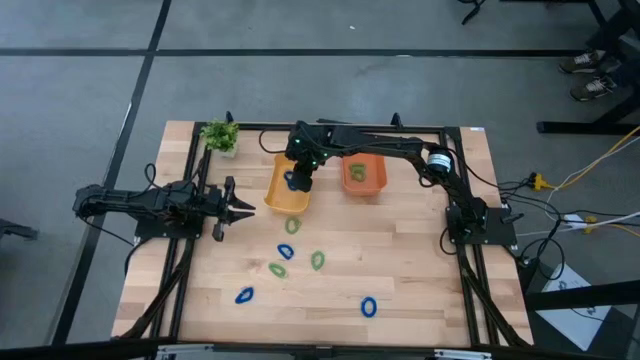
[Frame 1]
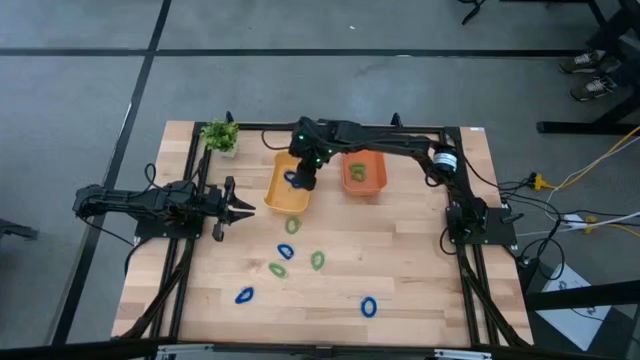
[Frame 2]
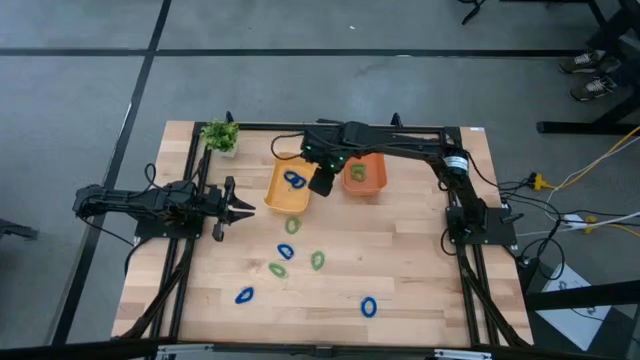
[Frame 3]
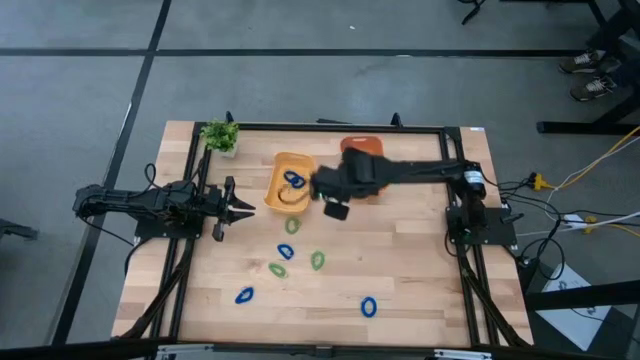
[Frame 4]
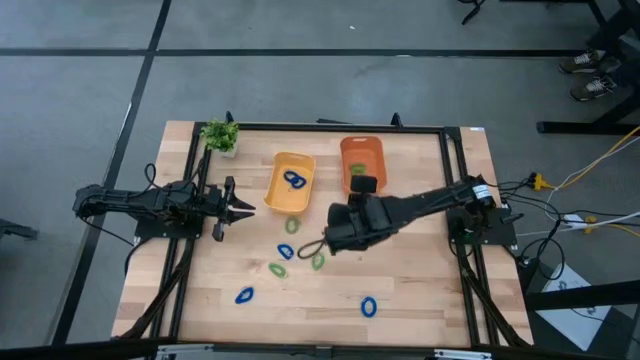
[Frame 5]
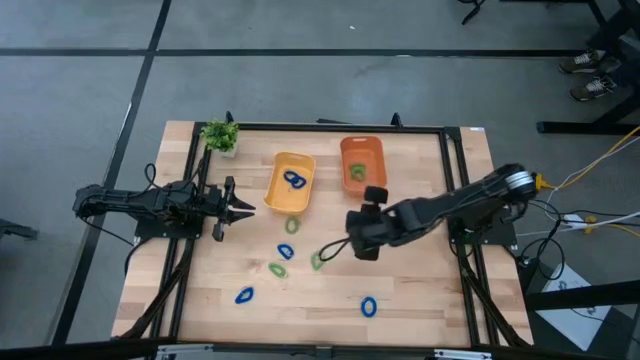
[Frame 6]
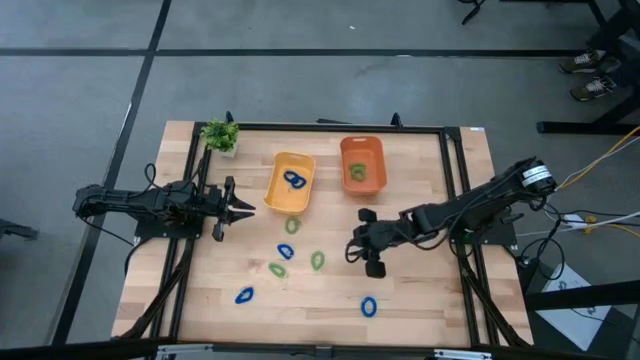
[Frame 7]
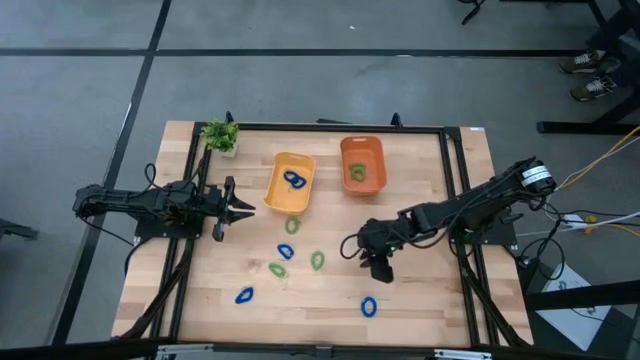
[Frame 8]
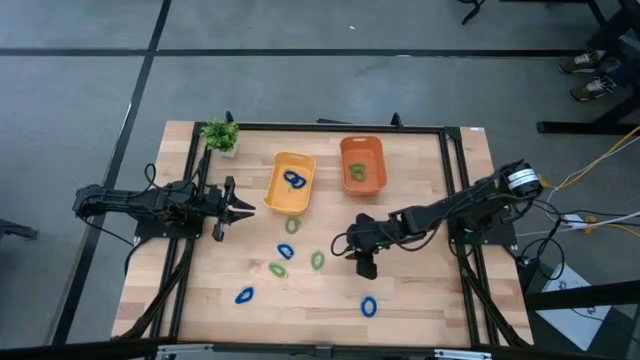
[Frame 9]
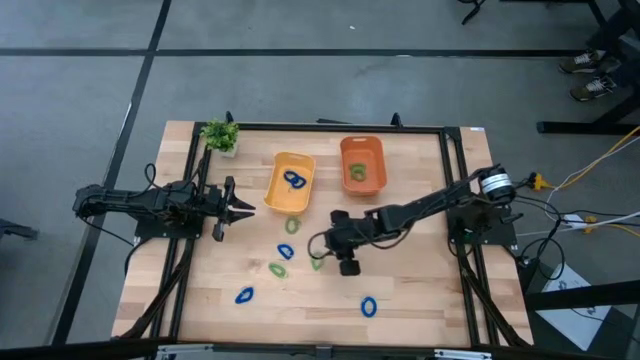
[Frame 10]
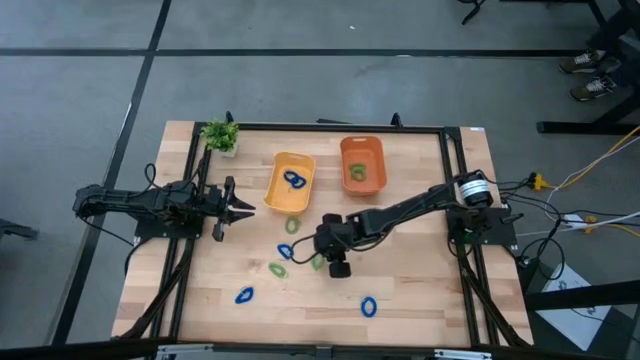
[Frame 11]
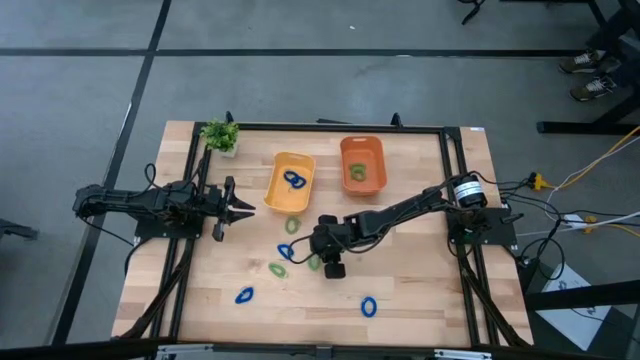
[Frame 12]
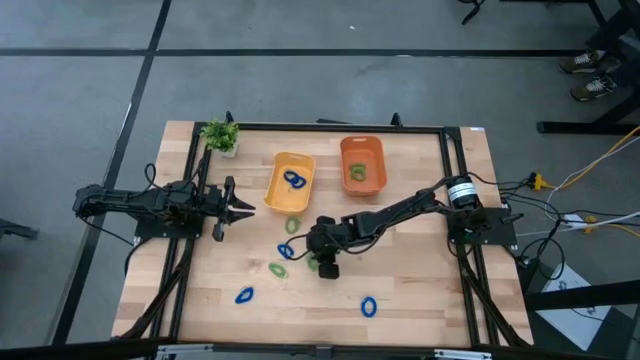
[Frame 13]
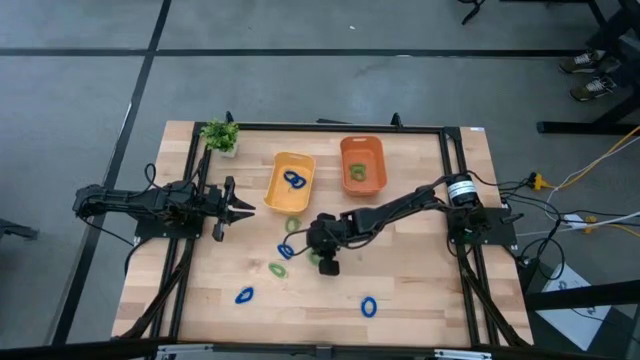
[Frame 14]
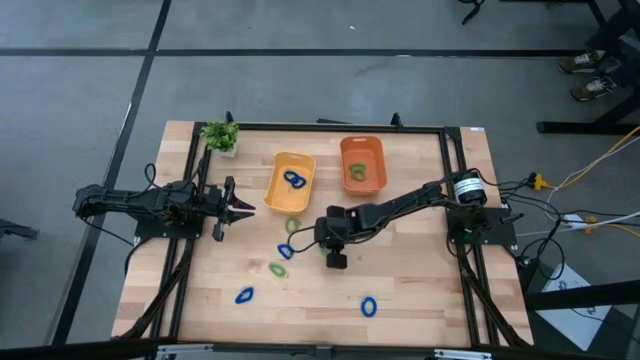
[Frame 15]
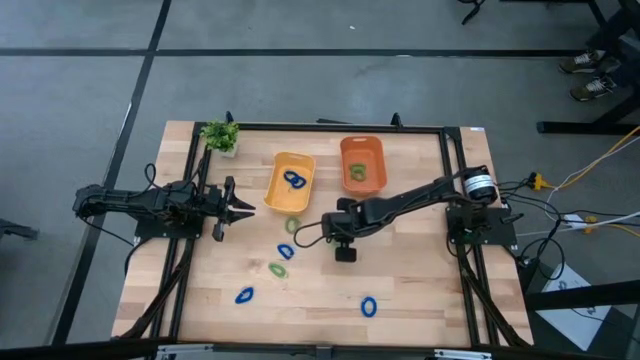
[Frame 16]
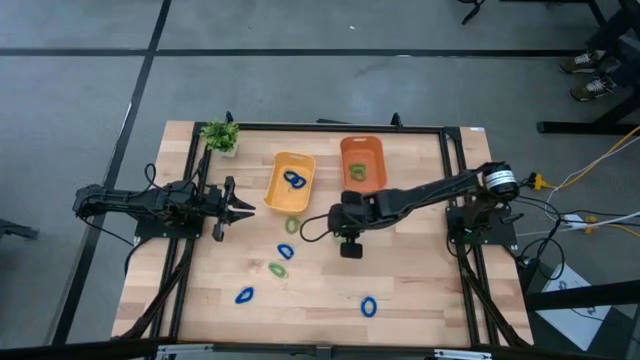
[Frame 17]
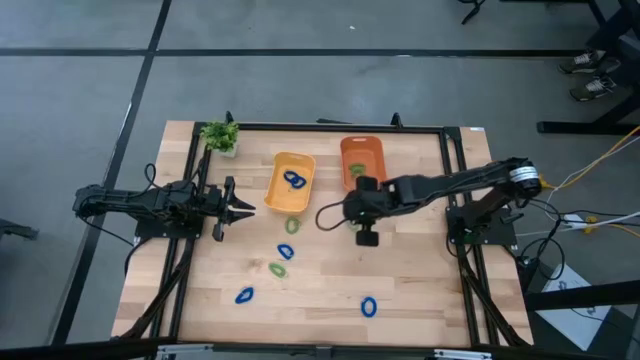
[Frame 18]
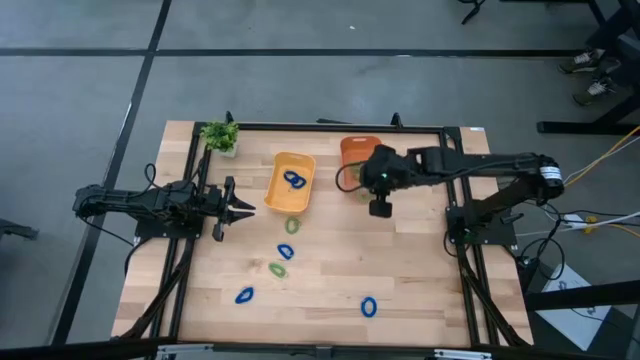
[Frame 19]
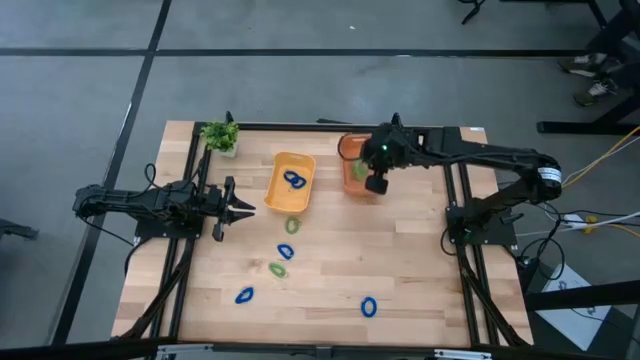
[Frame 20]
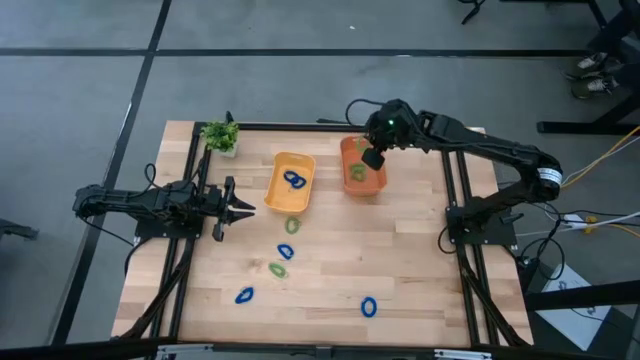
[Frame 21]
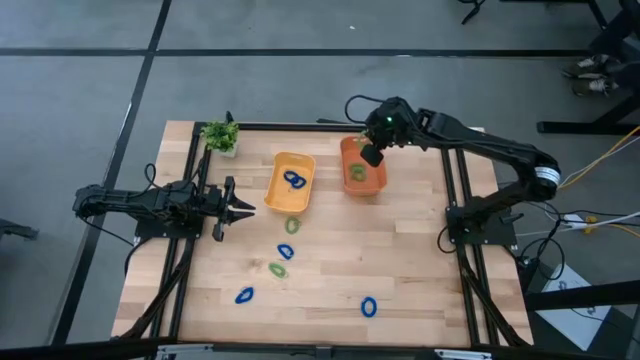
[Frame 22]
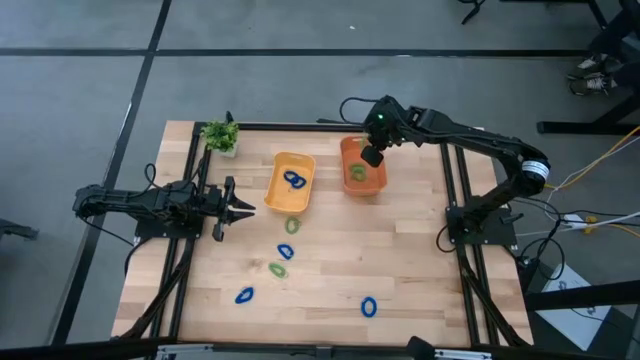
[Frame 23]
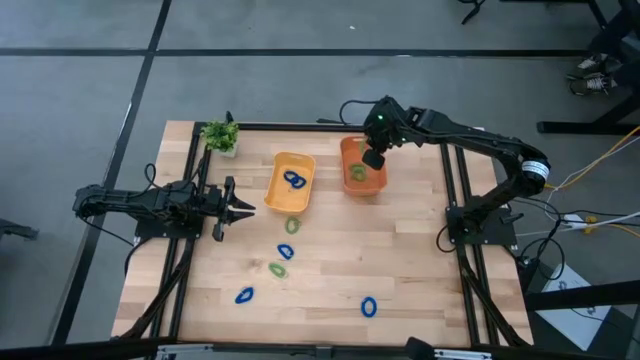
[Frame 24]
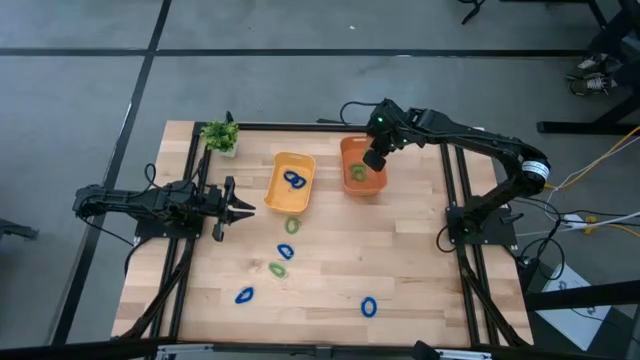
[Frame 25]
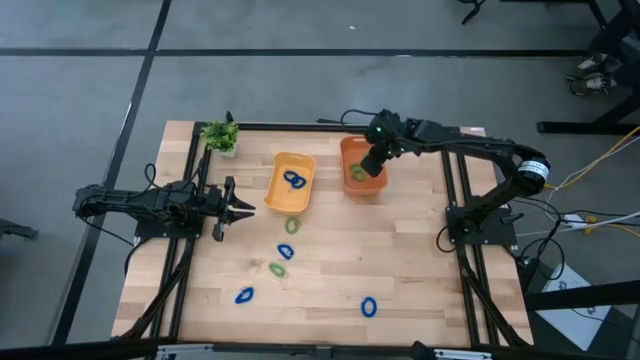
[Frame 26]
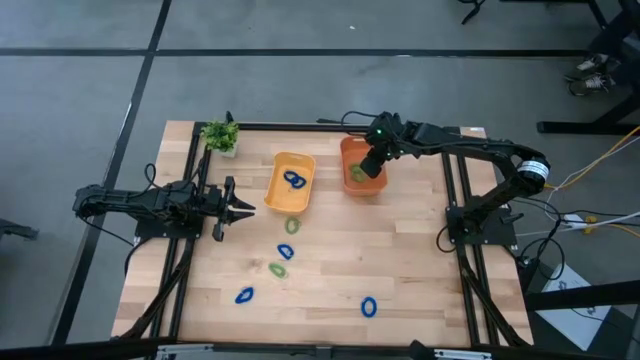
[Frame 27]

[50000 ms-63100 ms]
Task: Sort items
Put the green keychain into the orange bin

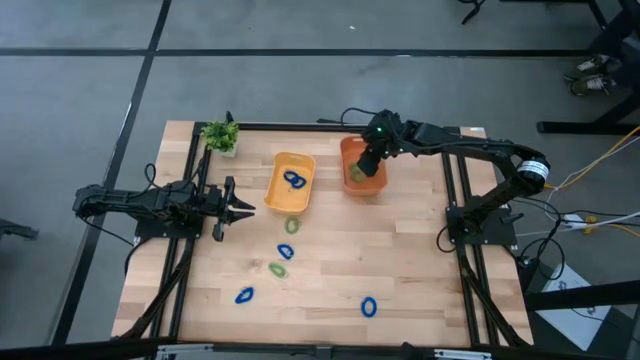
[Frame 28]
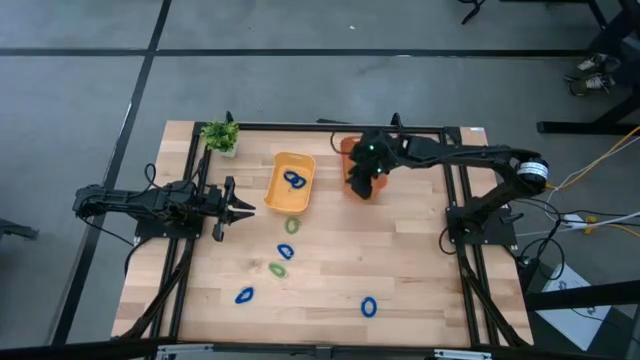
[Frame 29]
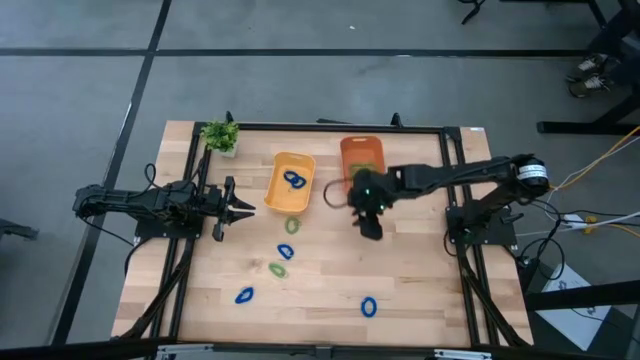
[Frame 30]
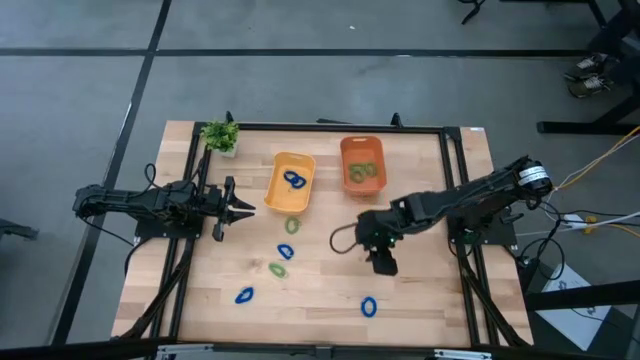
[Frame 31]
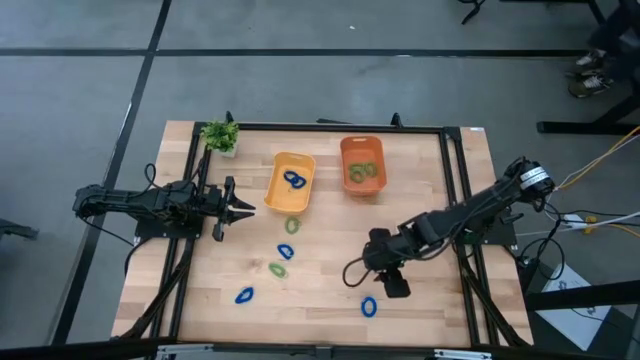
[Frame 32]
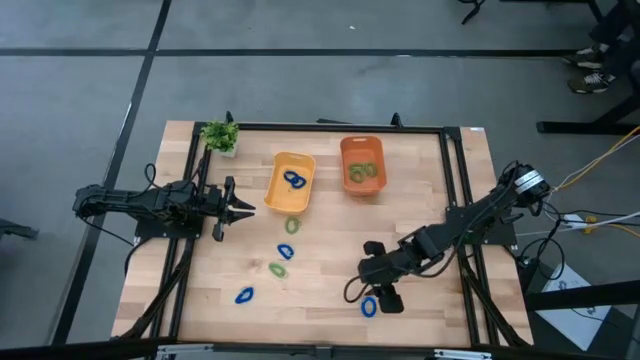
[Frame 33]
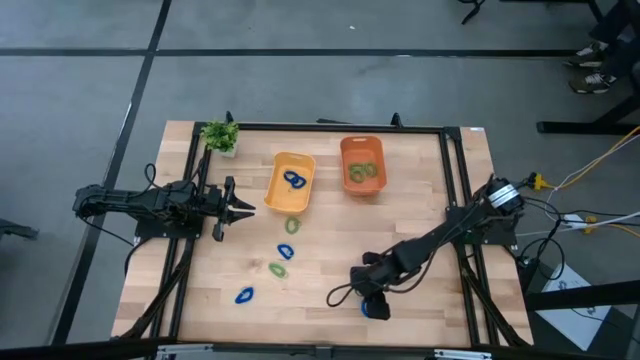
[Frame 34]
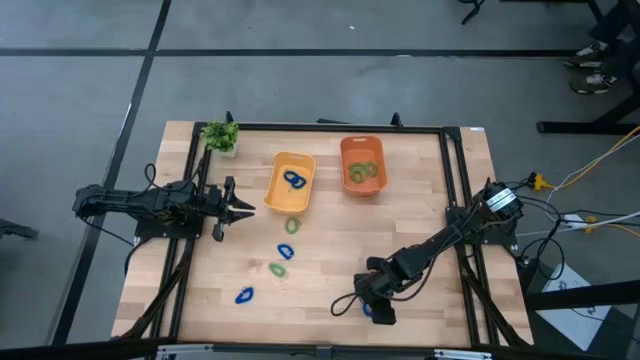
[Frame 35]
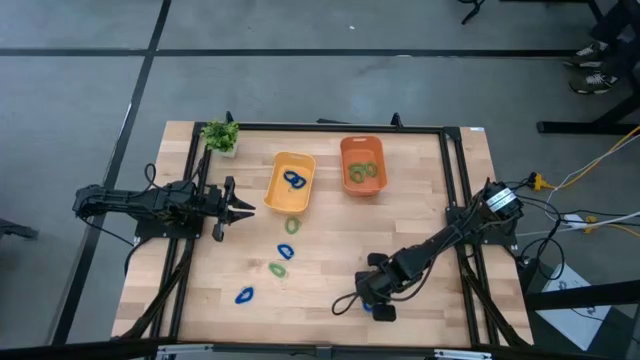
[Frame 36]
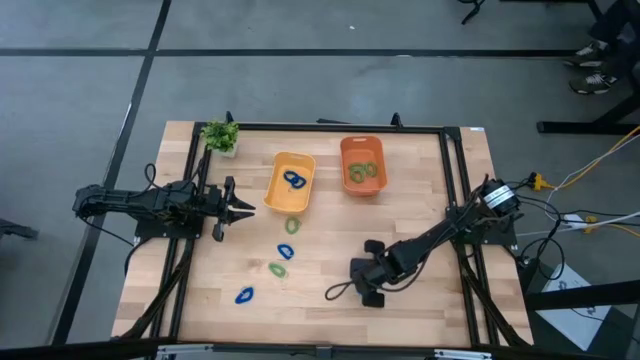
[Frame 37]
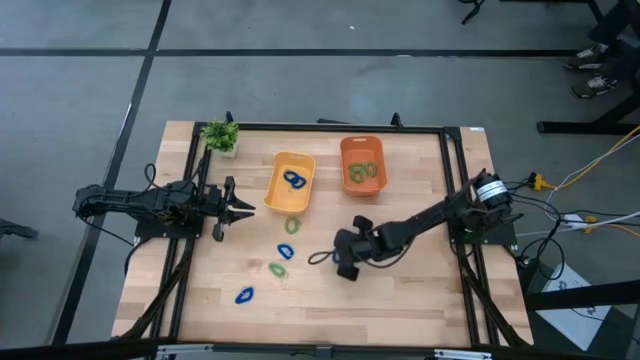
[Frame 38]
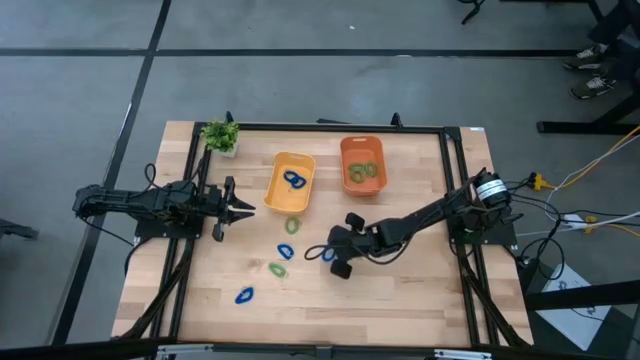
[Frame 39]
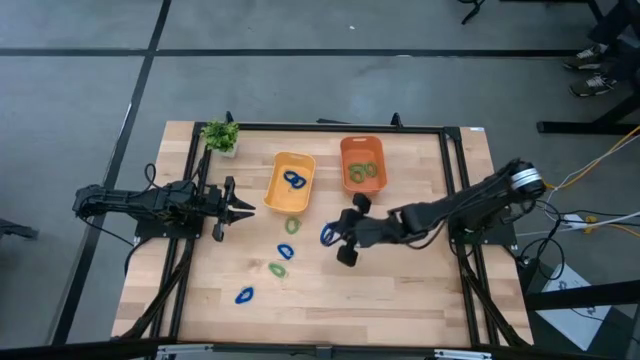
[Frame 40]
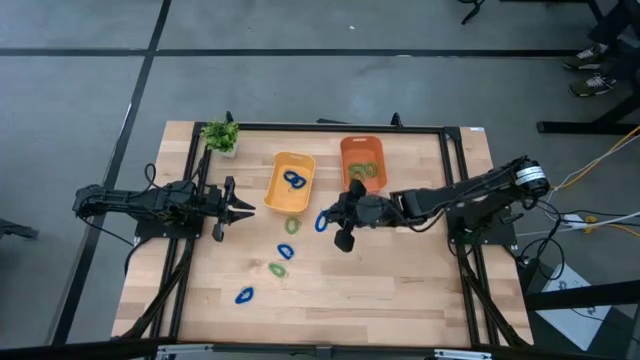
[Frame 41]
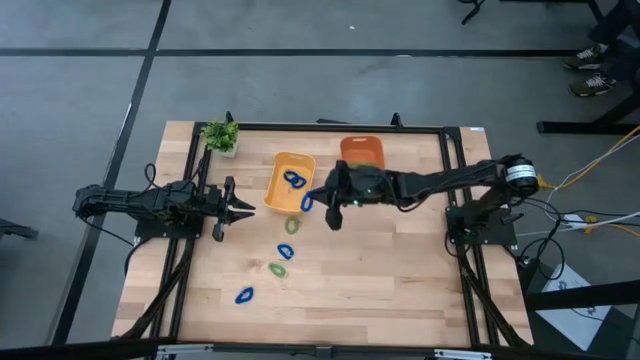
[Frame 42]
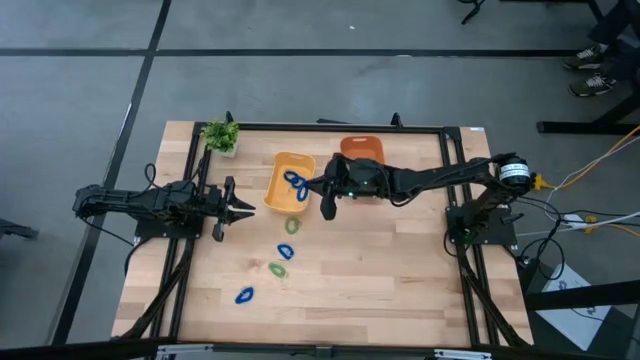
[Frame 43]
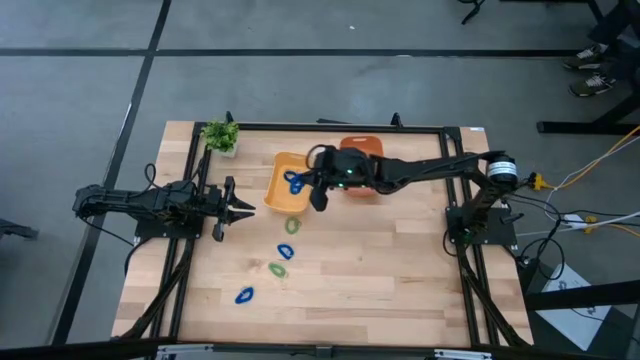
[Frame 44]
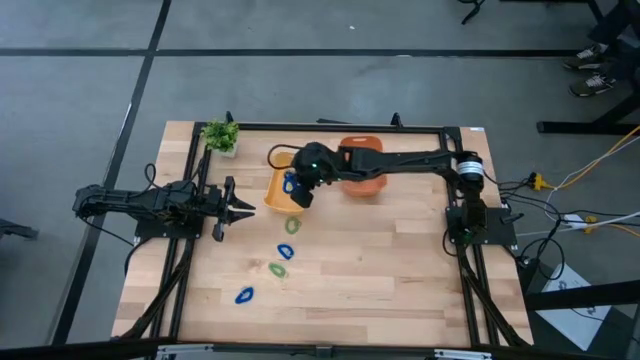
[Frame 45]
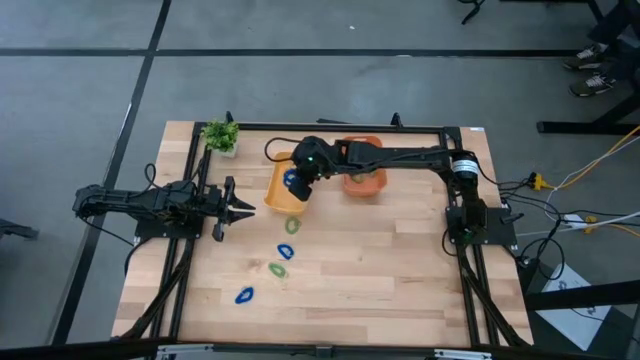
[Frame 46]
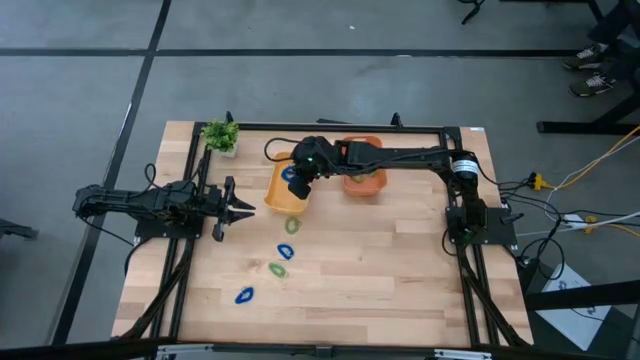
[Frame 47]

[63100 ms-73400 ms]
Put the blue keychain into the yellow bin
